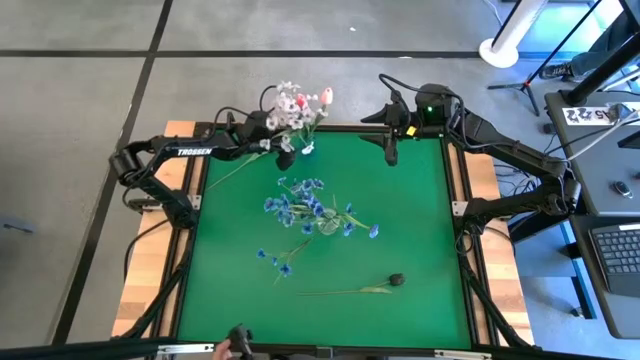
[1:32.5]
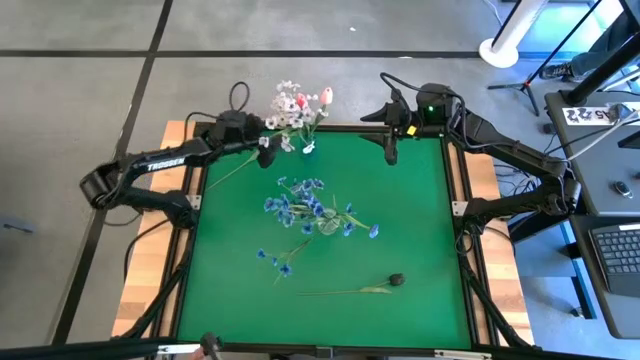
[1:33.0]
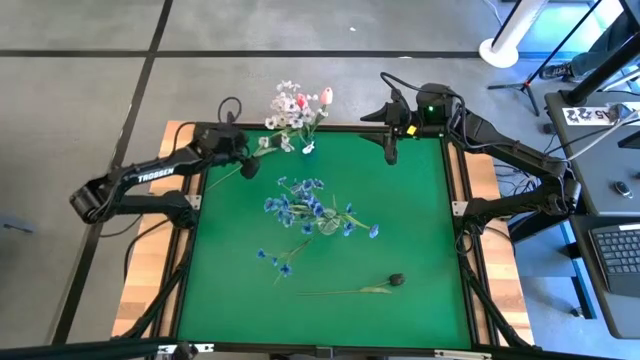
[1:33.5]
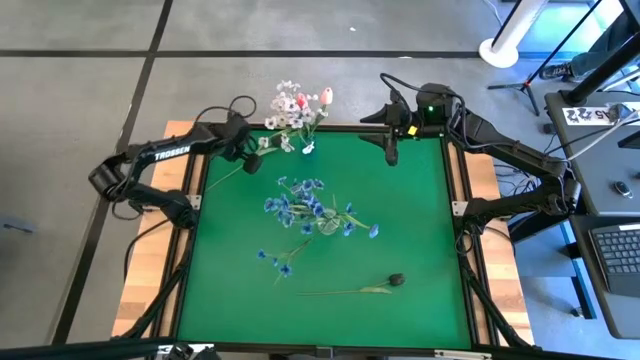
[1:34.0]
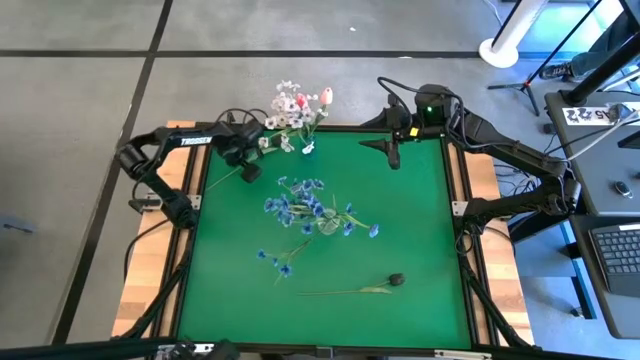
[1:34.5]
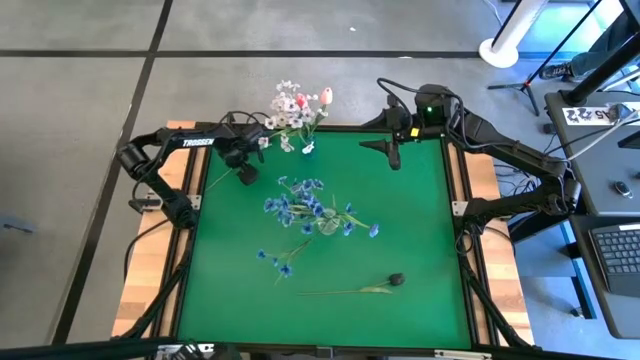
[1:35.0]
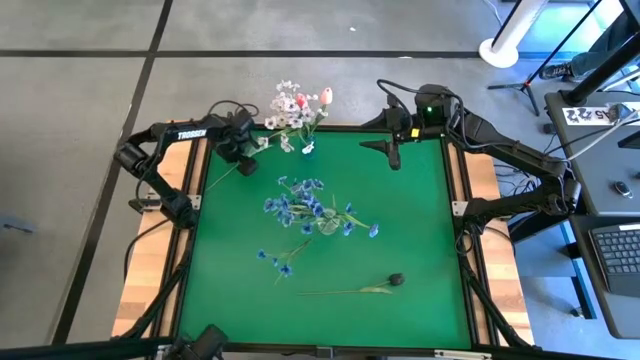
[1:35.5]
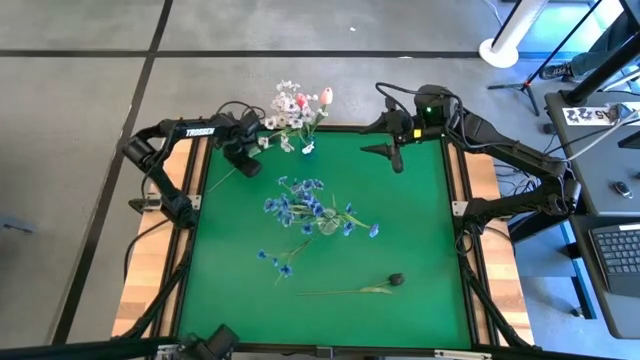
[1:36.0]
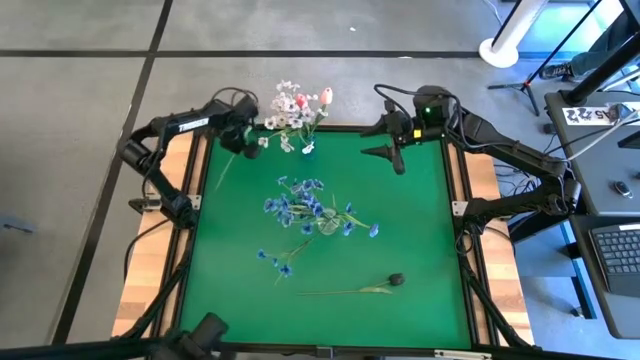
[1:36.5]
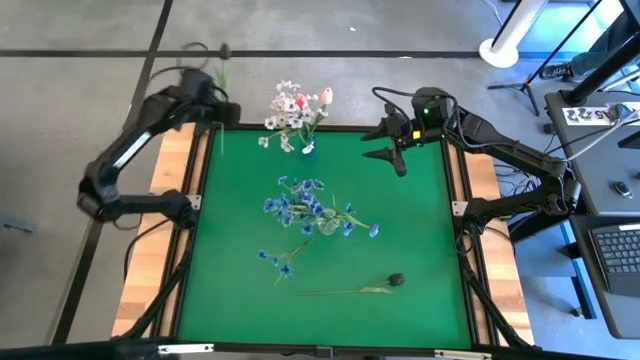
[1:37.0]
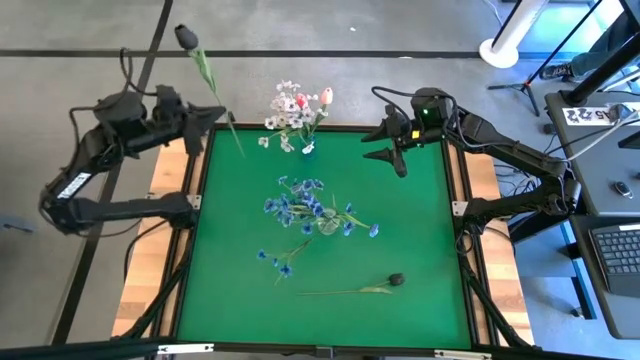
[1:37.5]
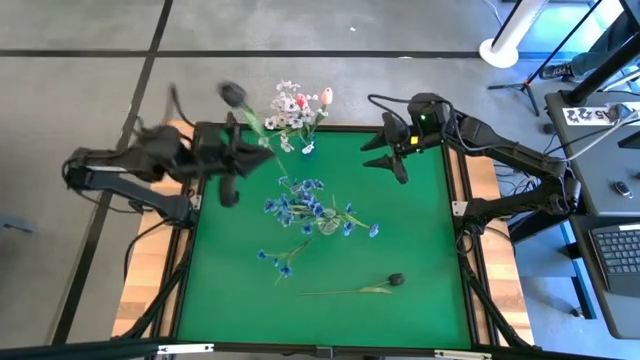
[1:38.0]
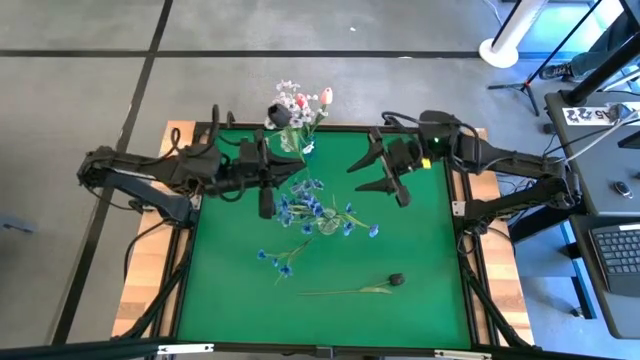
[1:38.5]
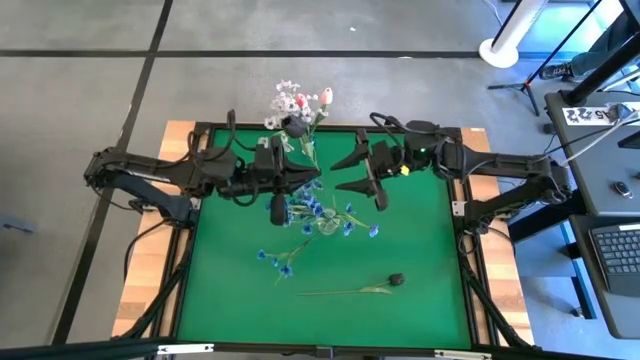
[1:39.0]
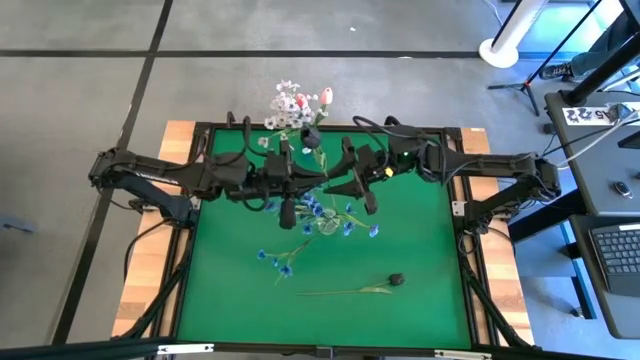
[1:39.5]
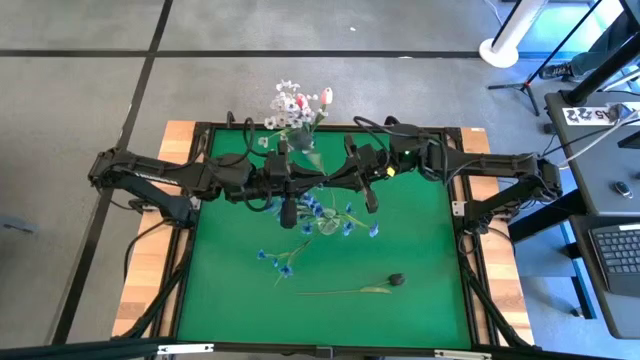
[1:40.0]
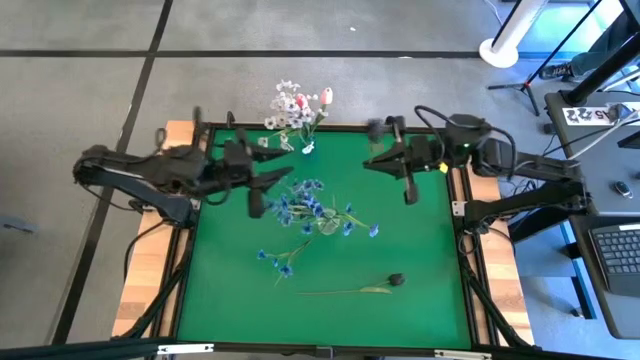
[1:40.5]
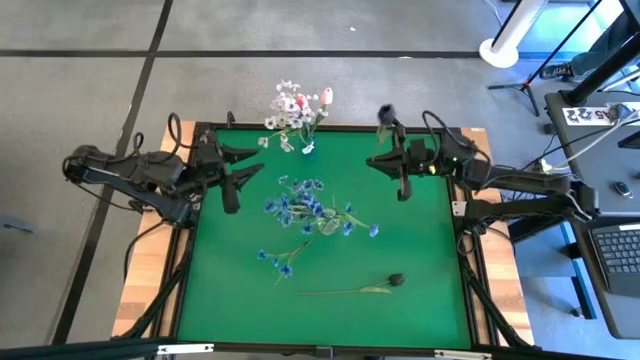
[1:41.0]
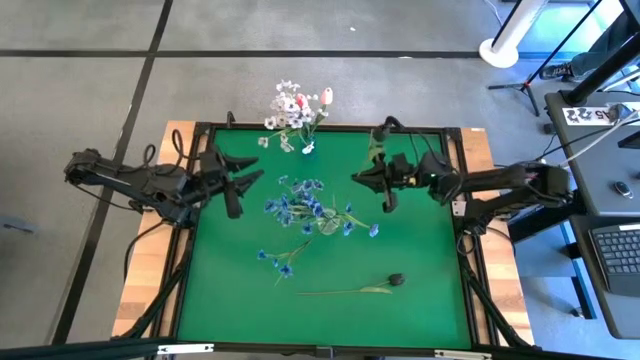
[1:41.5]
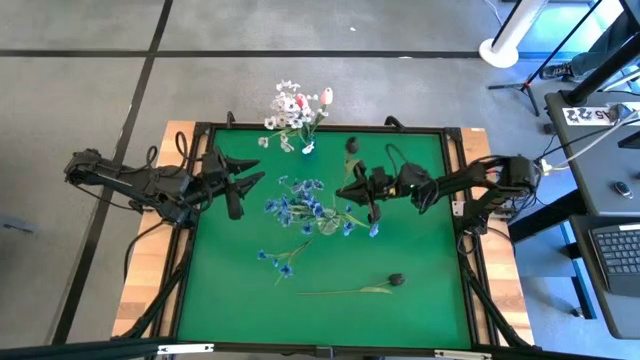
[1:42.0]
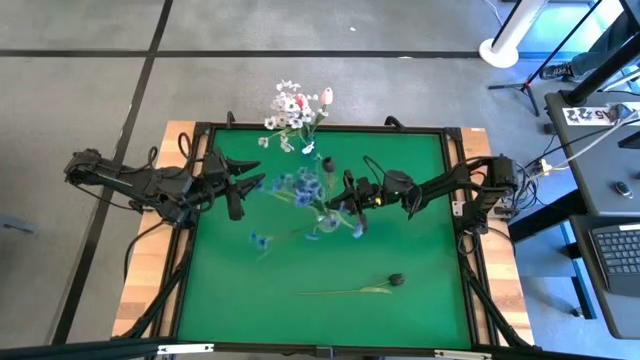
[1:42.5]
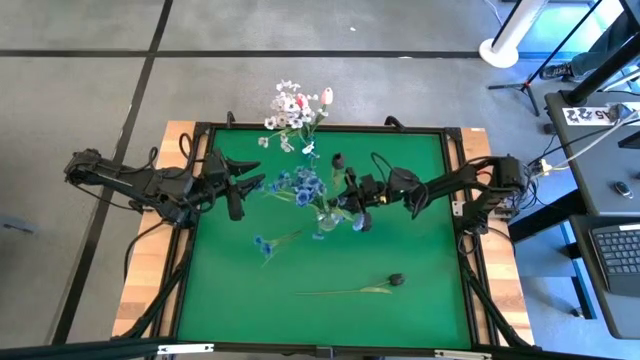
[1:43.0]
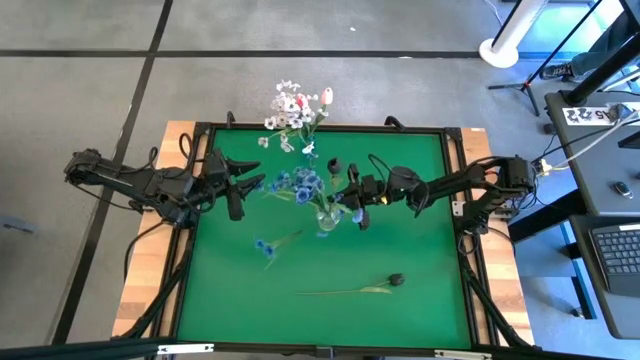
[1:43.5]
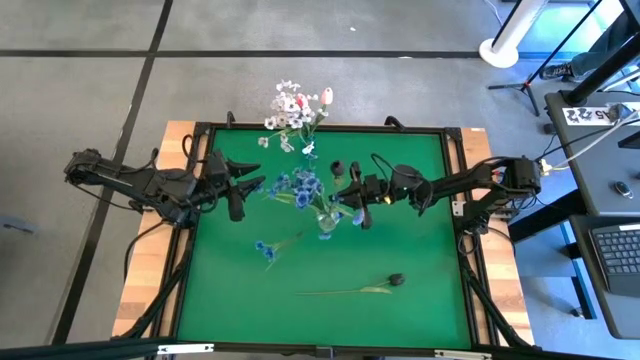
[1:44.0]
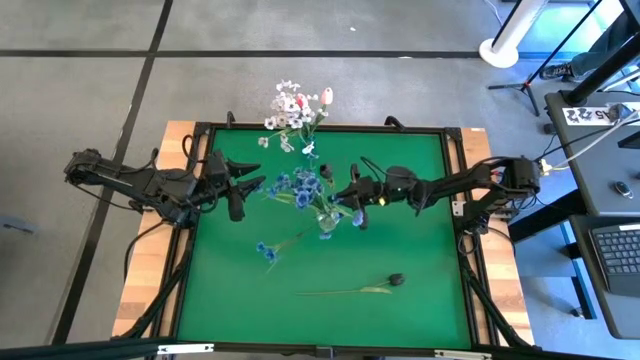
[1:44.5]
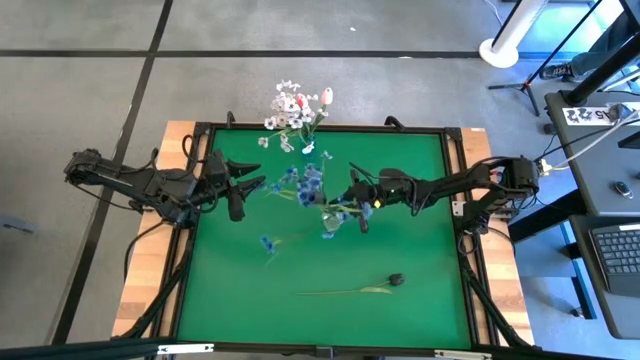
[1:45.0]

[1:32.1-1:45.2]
Task: Sort flowers into vase by color
Put the top left black flower into the transparent vase

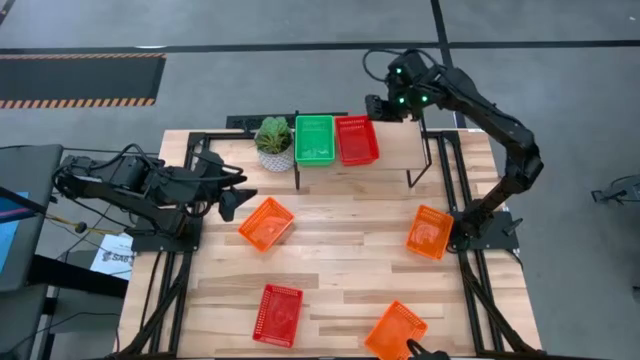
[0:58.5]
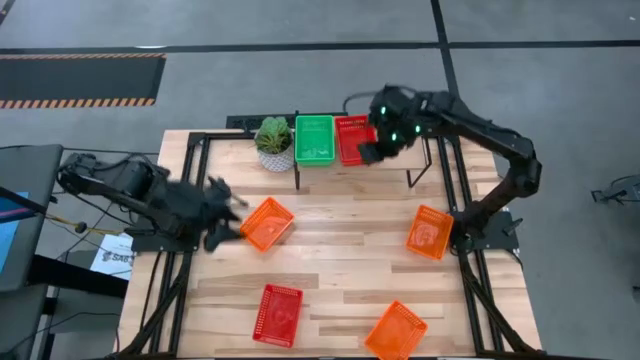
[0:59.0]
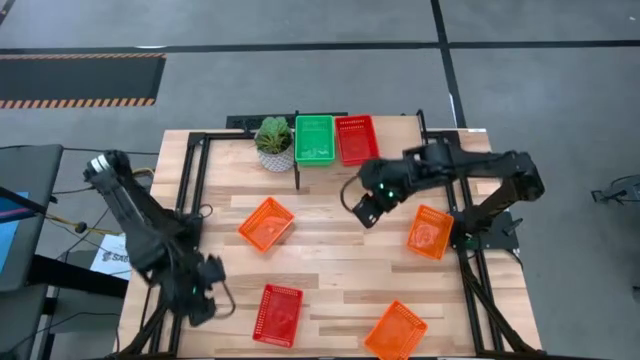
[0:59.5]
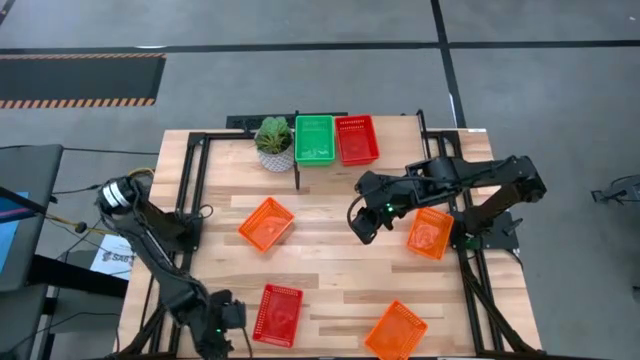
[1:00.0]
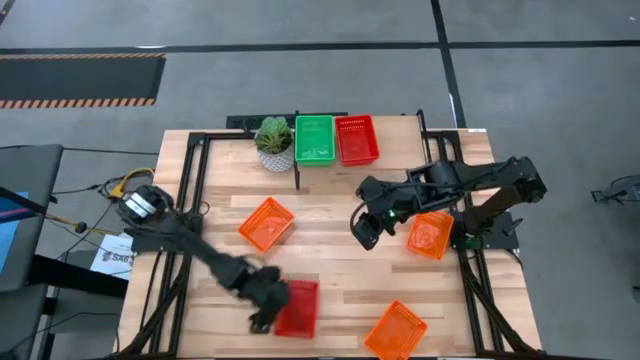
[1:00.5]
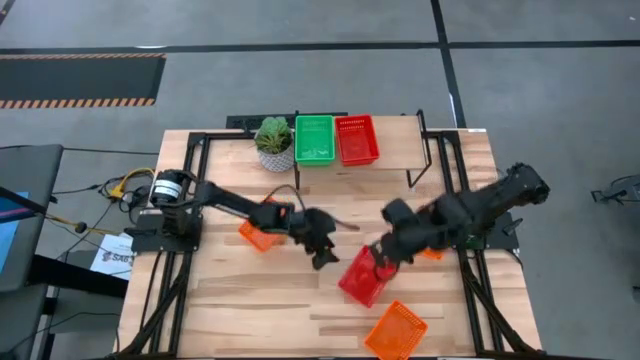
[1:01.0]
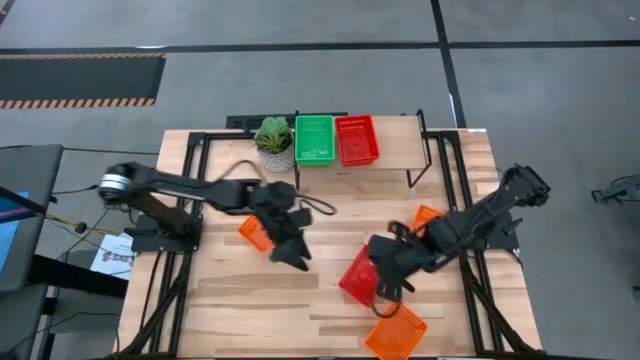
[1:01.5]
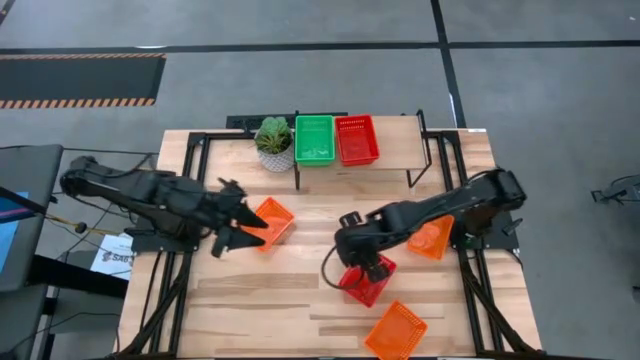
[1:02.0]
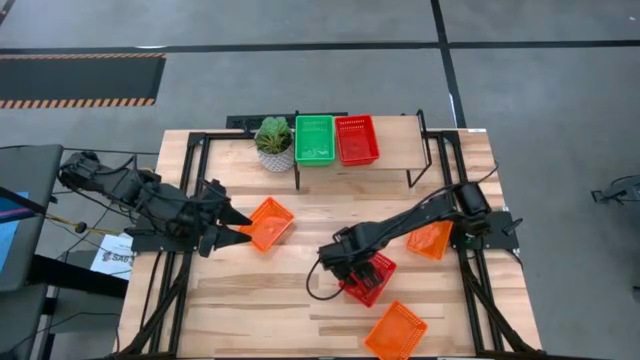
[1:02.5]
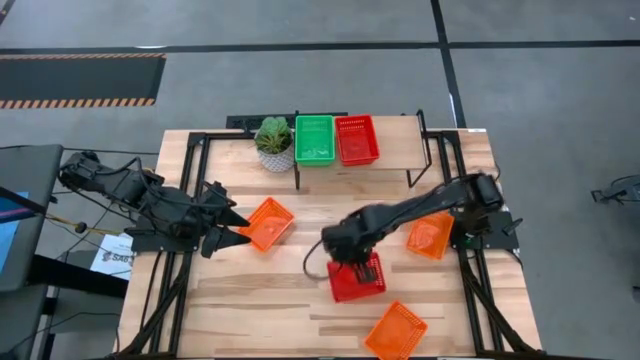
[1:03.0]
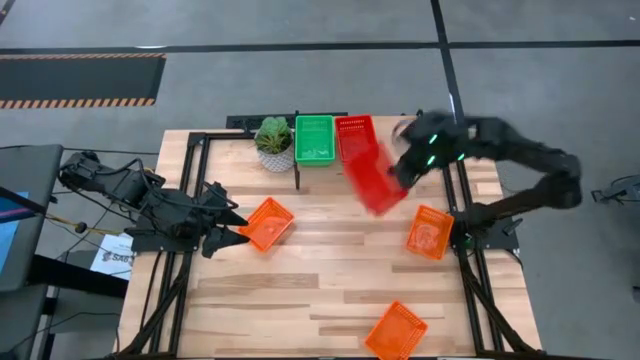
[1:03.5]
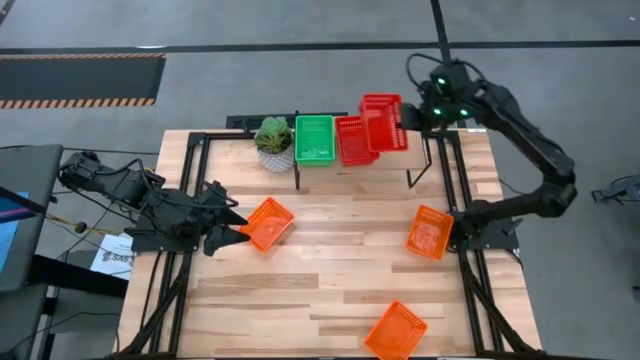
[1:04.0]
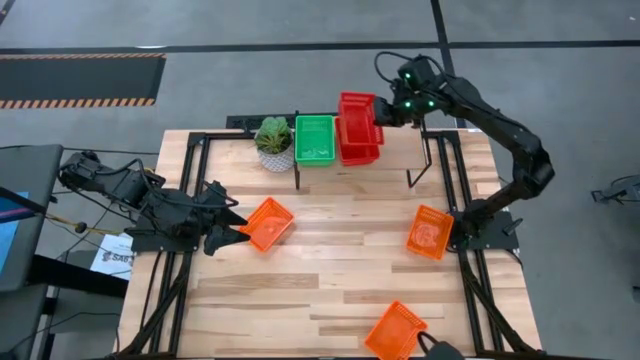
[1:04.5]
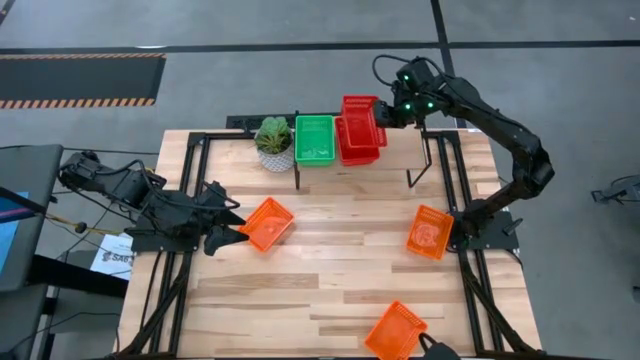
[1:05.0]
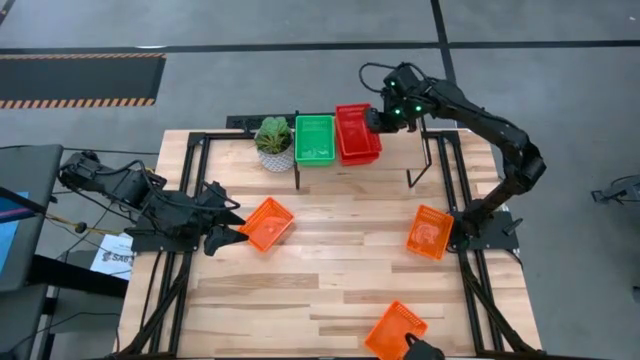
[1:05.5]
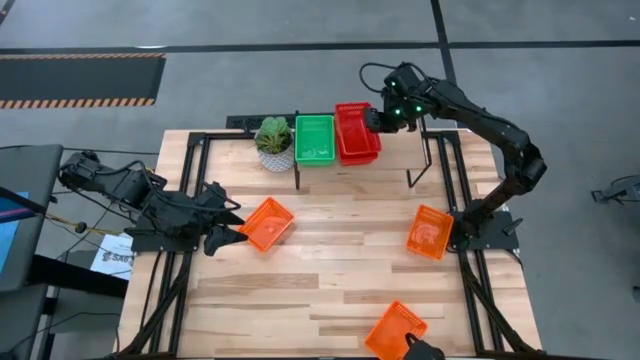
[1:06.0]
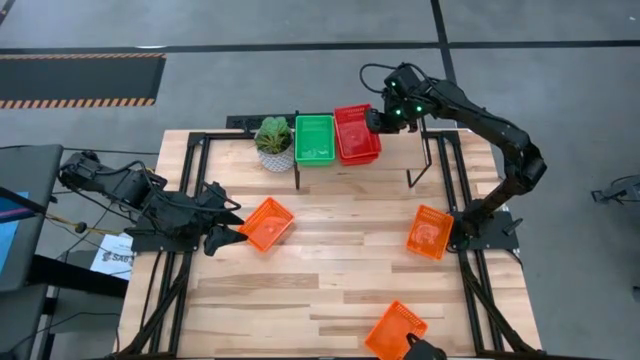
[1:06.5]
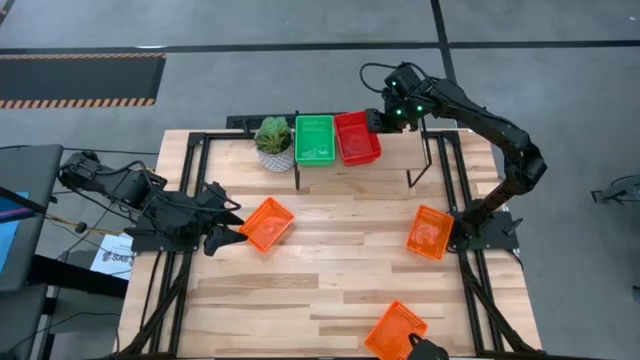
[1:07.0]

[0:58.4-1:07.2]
Task: Stack baskets on shelf by color
Stack the red bin on top of the red bins on the shelf
